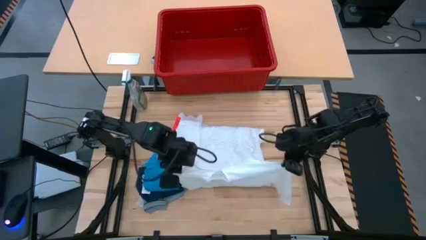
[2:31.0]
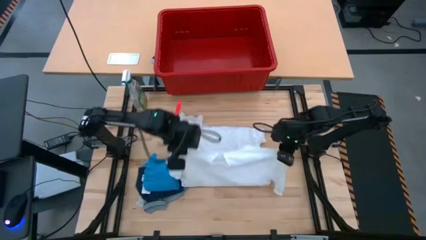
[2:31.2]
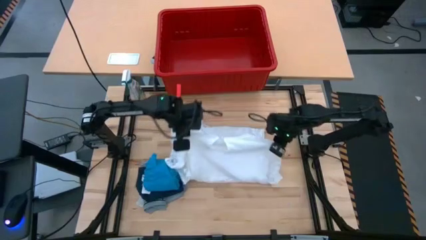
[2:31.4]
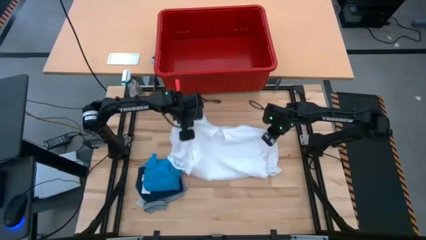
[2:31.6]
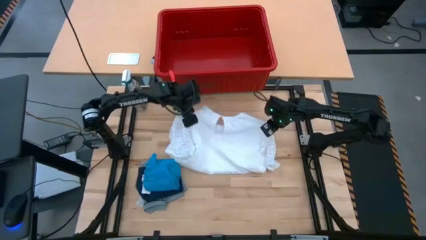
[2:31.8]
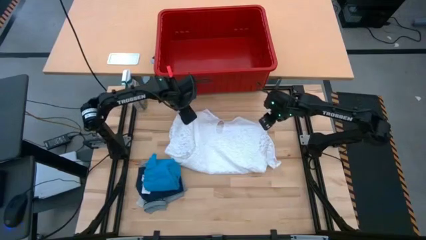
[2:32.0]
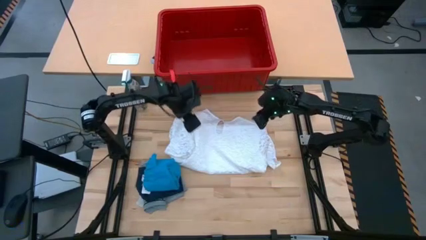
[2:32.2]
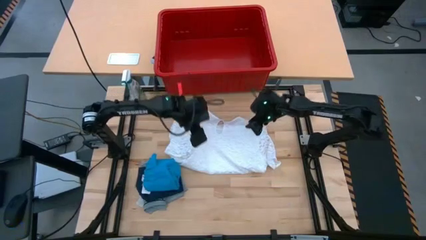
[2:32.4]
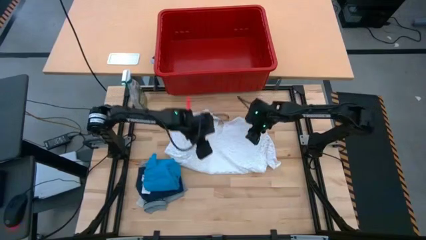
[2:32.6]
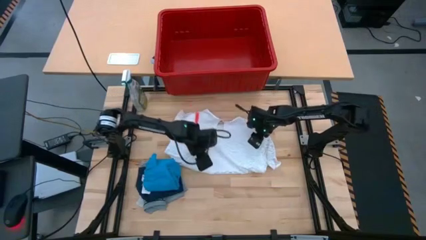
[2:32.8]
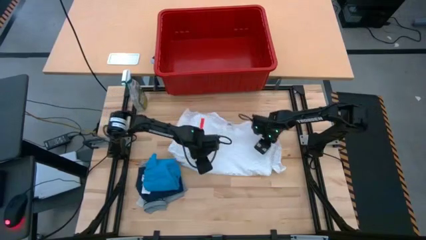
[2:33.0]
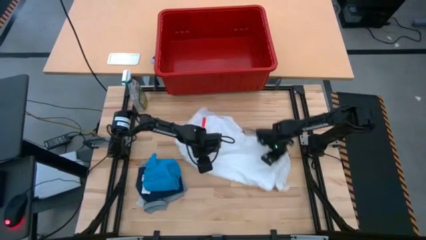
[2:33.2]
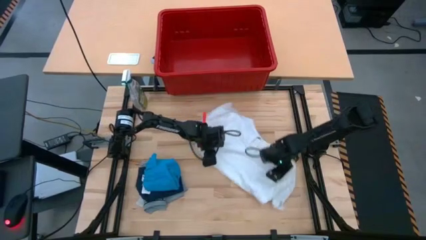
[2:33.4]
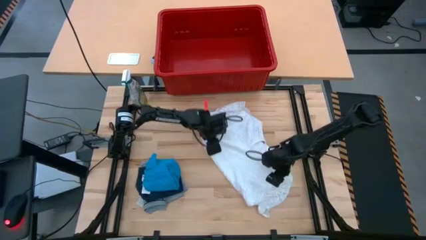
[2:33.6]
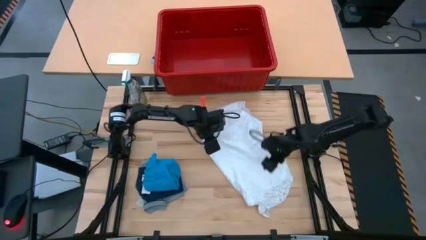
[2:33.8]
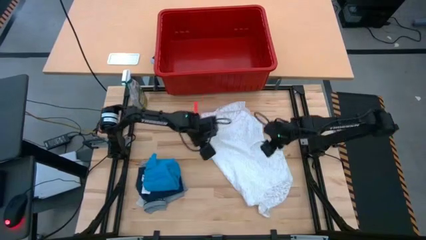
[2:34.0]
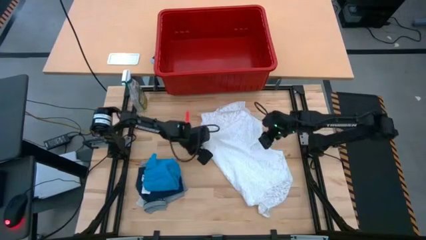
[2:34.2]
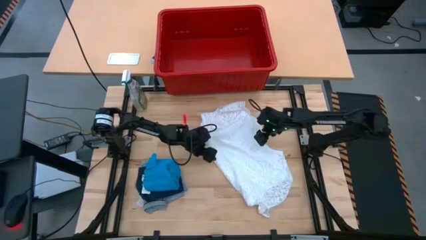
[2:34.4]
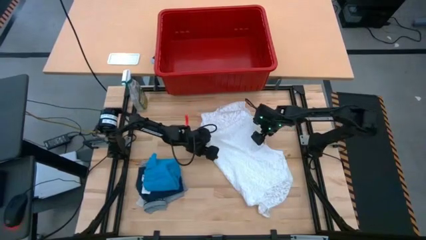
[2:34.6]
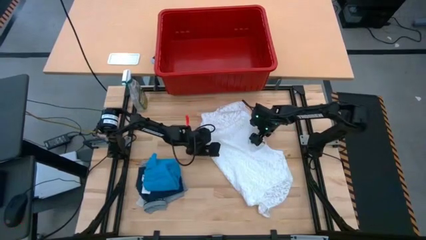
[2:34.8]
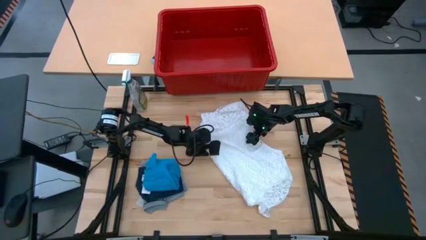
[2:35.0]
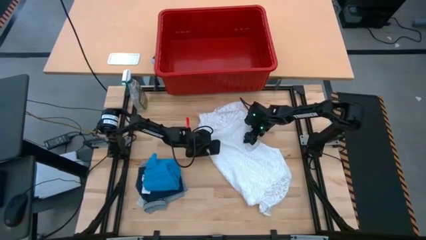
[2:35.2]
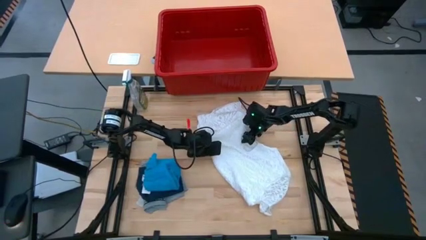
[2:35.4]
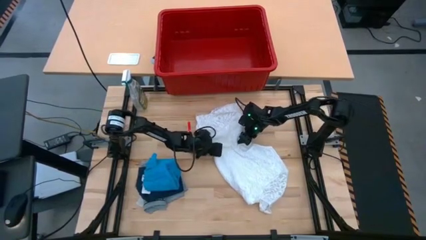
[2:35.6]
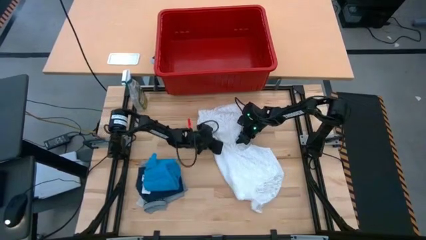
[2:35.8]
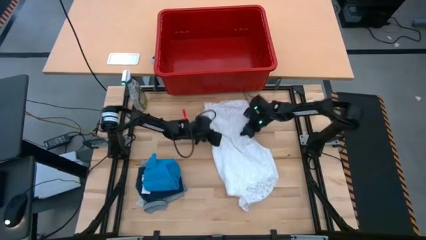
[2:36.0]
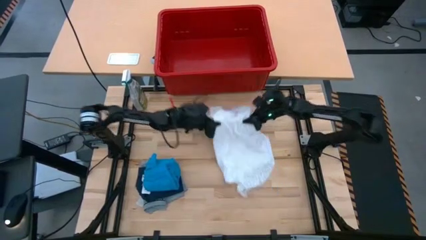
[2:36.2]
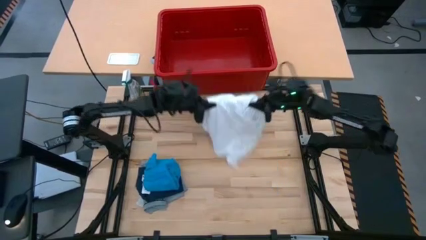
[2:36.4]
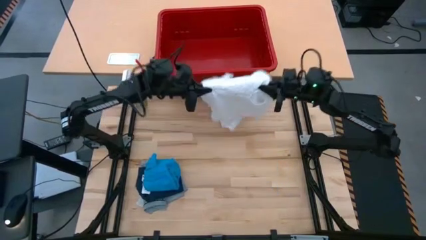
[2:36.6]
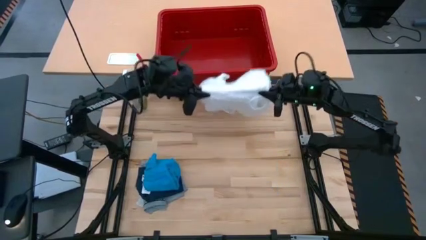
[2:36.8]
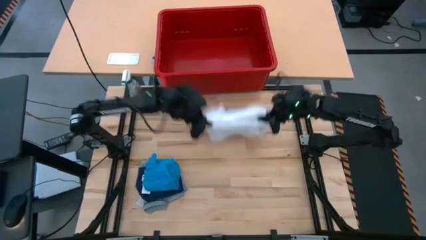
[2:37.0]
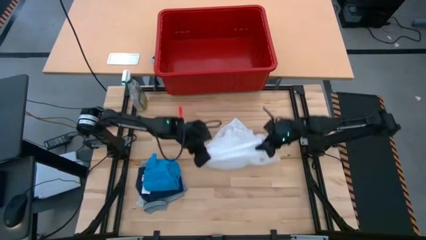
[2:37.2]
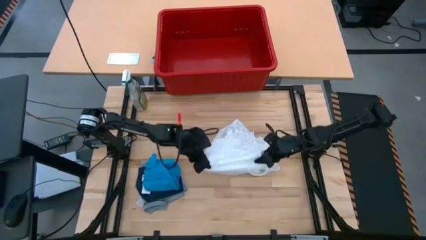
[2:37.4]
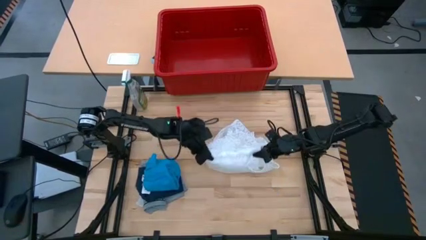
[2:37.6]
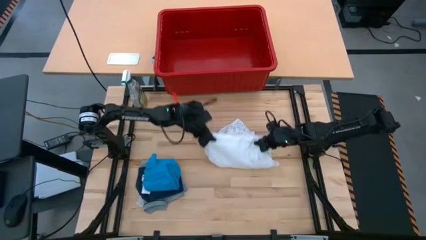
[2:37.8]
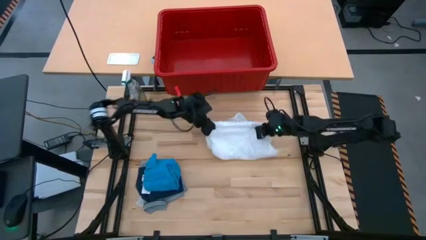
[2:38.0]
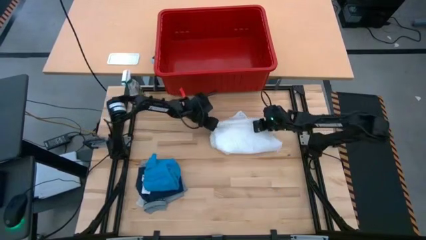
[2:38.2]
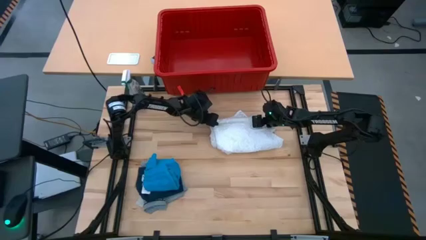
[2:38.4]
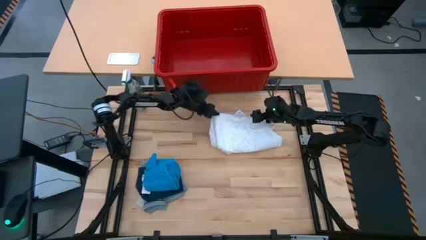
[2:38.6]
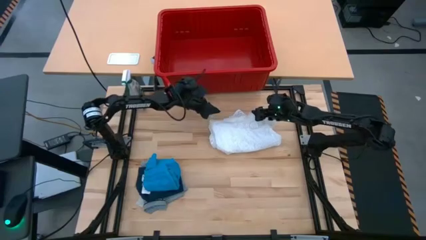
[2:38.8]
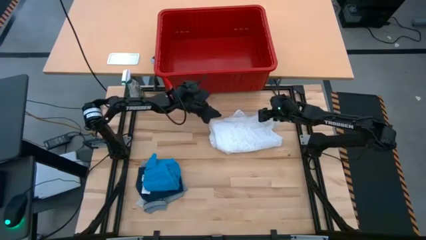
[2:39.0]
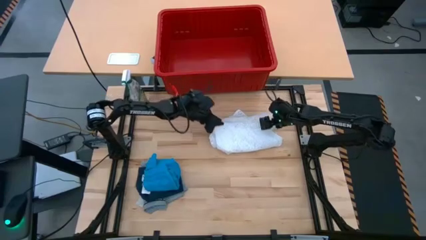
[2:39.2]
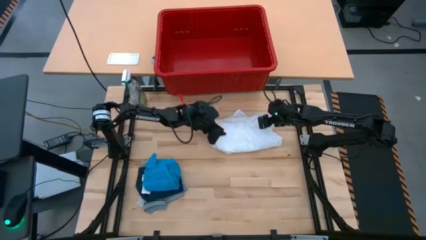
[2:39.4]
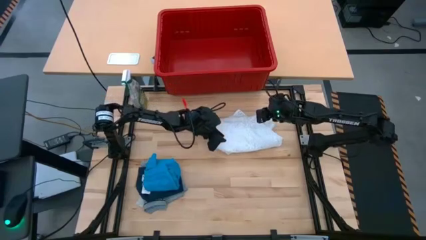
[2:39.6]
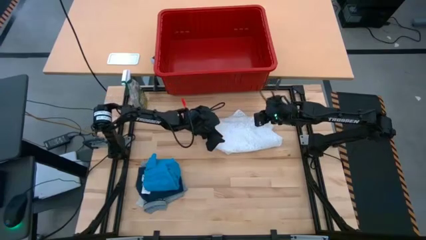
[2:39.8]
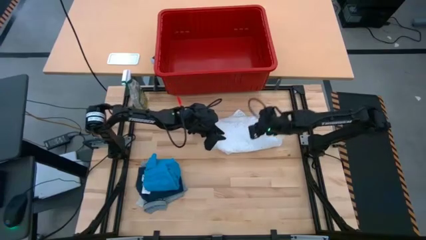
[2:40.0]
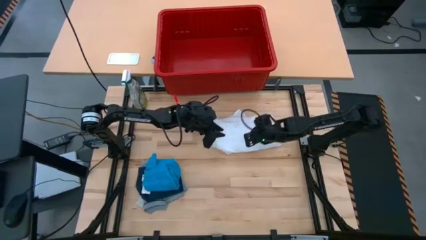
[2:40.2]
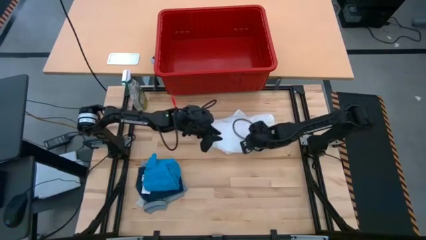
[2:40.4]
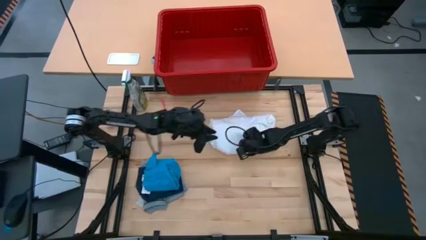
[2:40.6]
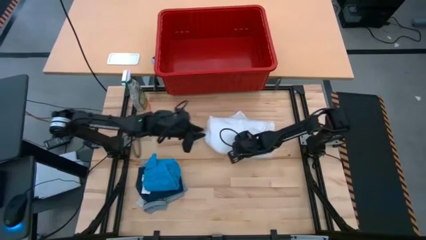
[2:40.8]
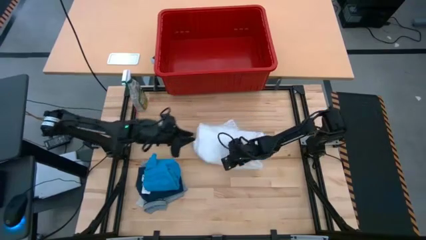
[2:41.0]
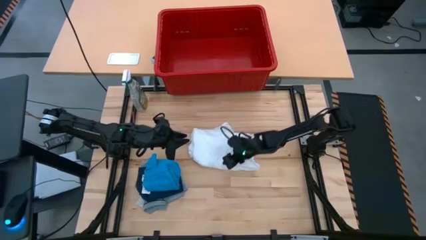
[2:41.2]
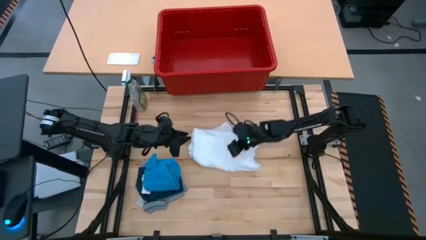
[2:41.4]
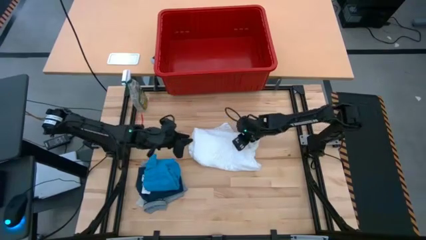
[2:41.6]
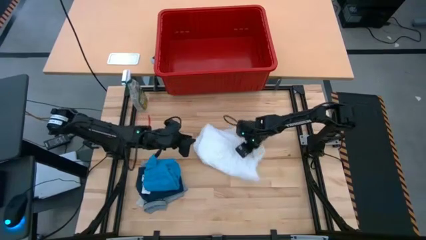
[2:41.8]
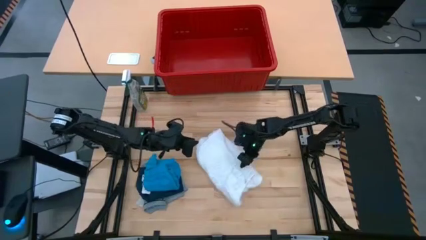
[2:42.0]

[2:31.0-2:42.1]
Task: Fold laundry
Fold the white blouse

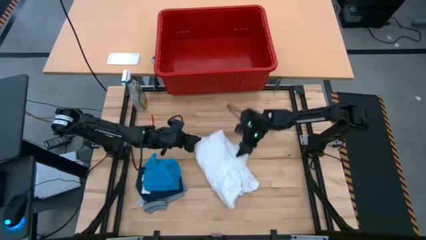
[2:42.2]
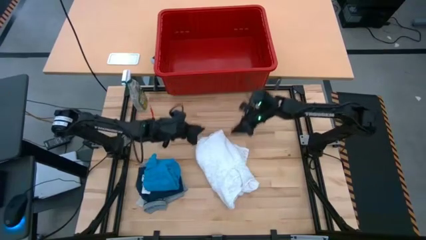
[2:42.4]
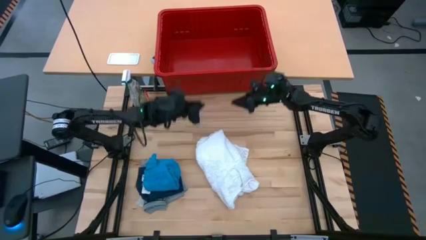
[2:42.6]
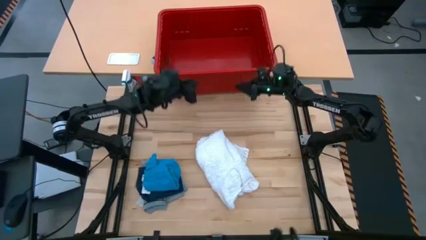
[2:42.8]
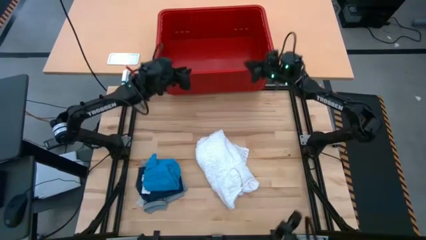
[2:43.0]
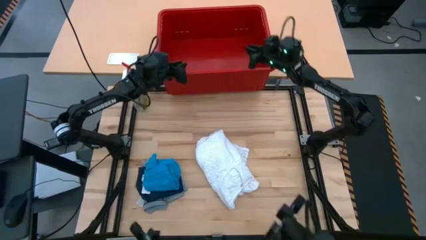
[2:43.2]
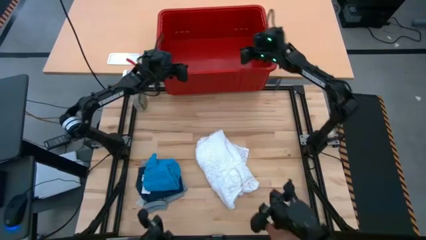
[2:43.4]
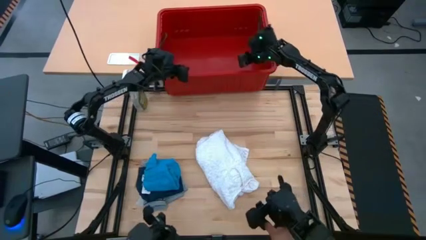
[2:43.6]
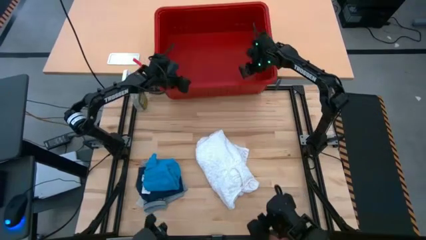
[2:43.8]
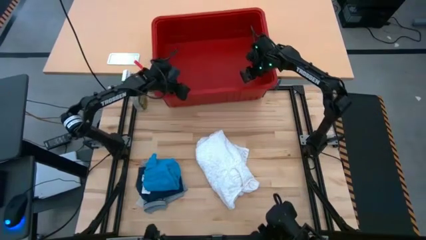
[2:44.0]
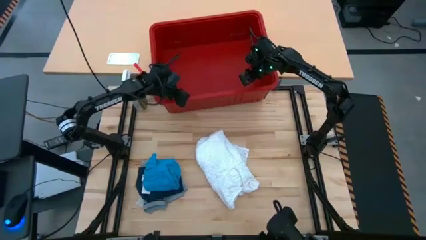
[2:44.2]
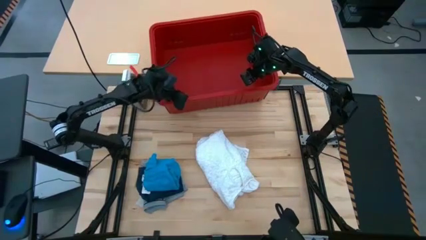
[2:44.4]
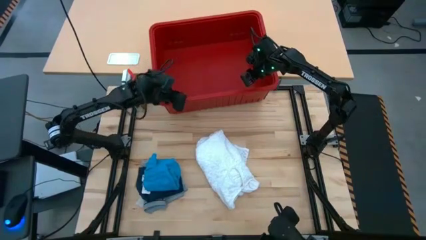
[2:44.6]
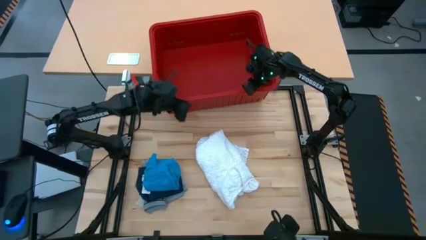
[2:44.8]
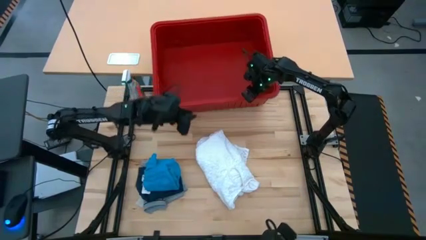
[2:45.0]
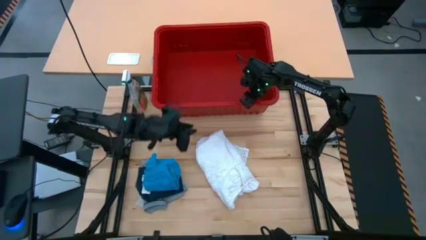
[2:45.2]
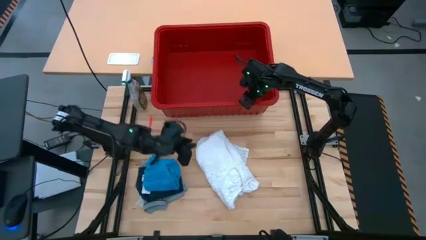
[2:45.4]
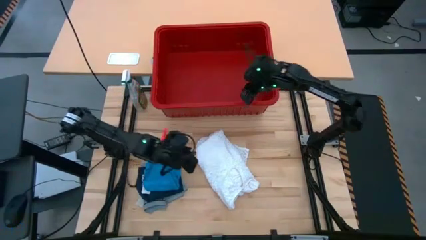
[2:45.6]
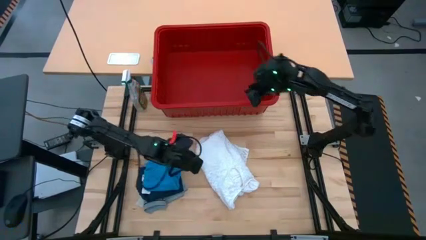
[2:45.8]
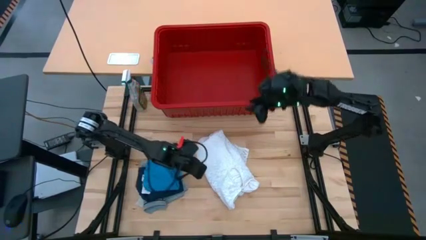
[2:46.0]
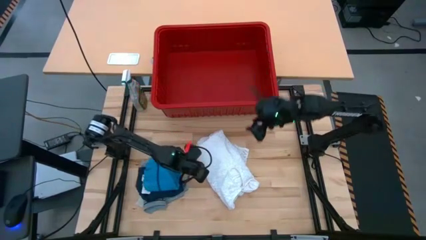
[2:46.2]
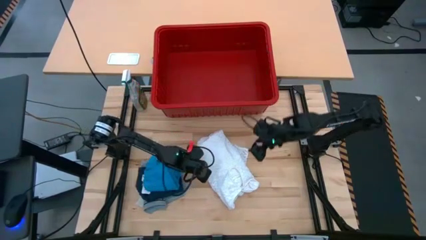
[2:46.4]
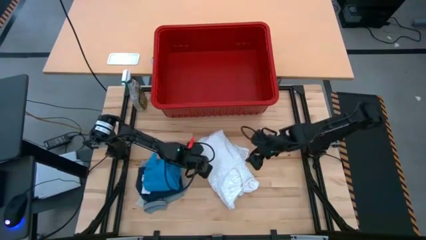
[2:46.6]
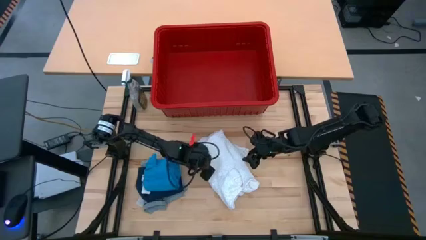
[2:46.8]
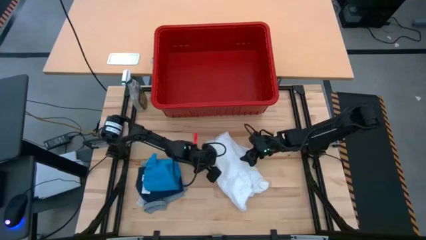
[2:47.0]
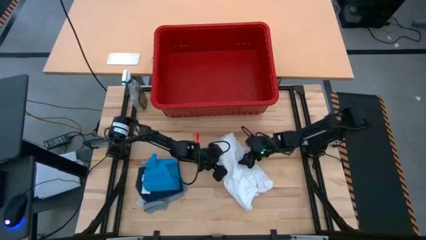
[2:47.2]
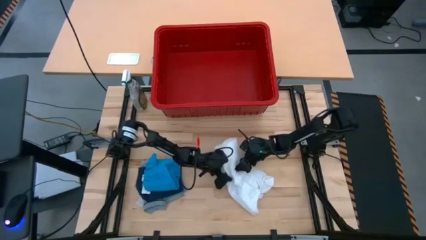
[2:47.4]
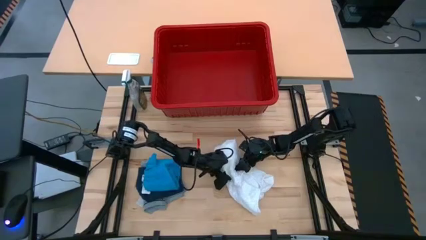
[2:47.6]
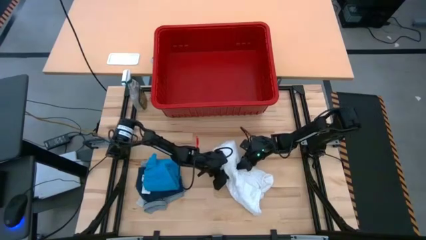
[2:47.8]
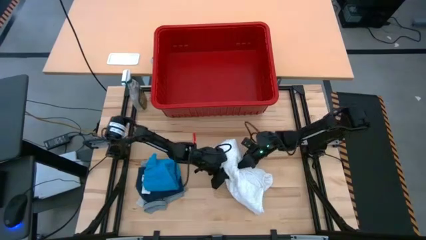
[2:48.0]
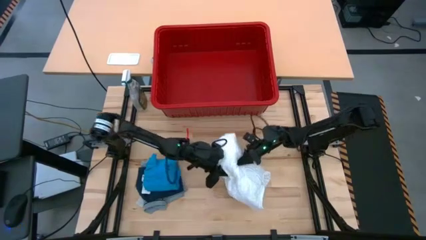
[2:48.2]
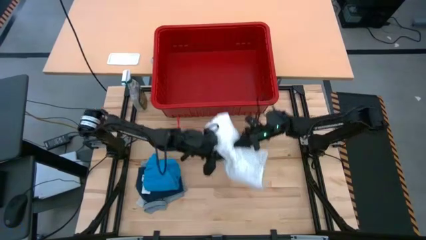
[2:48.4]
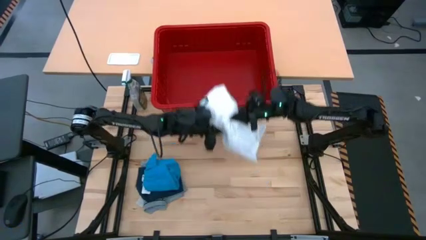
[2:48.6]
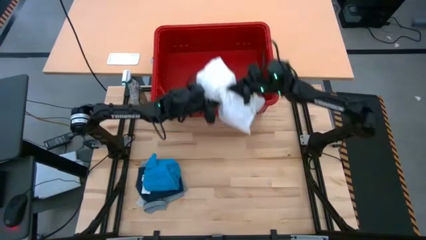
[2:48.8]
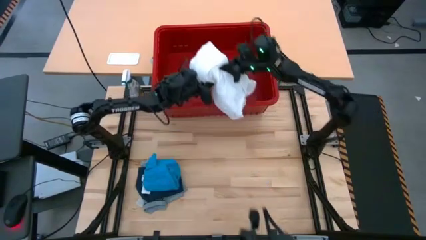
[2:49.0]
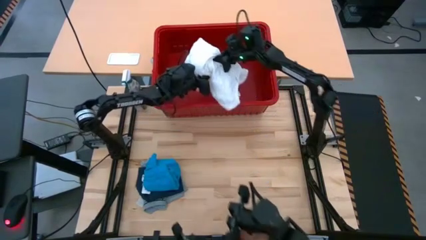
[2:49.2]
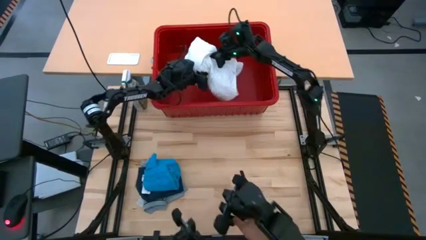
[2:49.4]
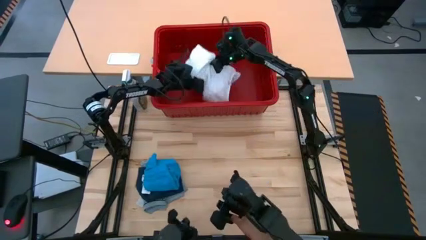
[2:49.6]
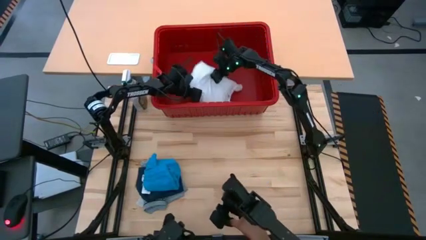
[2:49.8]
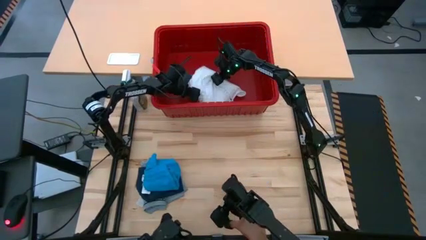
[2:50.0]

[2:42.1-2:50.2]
Put the folded white blouse into the red laundry bin
